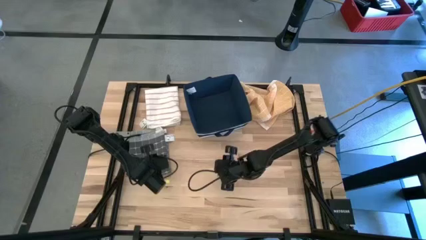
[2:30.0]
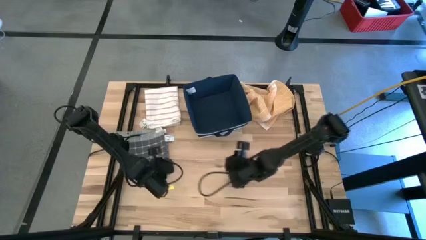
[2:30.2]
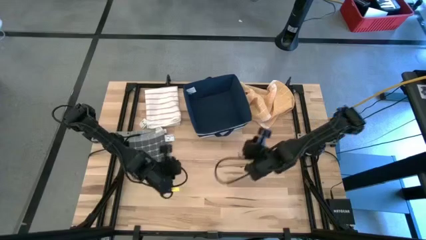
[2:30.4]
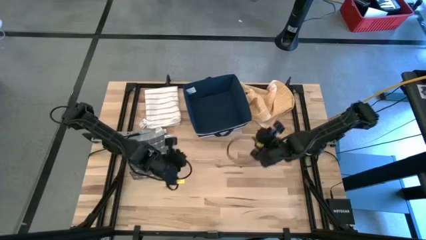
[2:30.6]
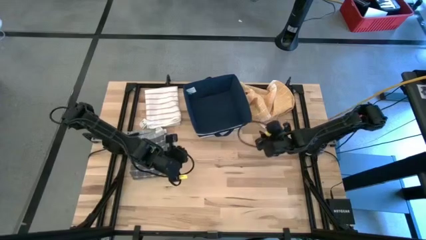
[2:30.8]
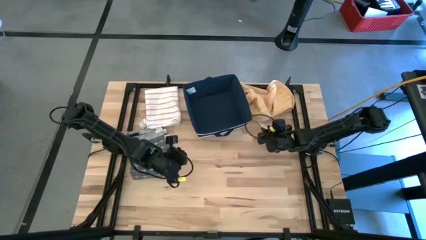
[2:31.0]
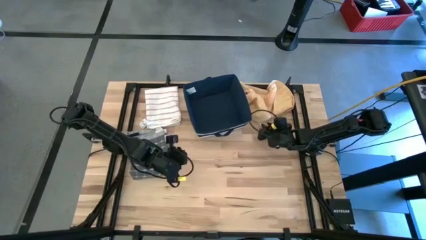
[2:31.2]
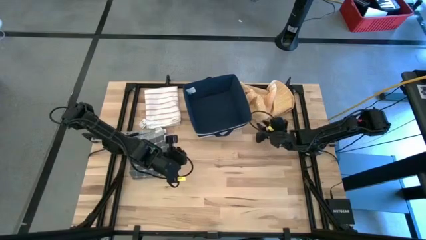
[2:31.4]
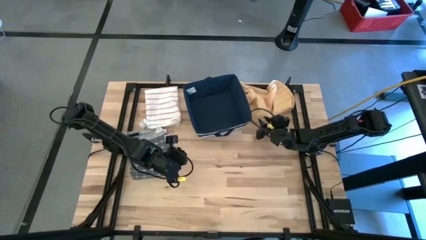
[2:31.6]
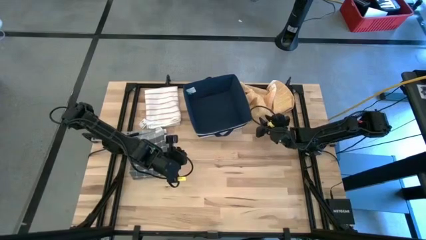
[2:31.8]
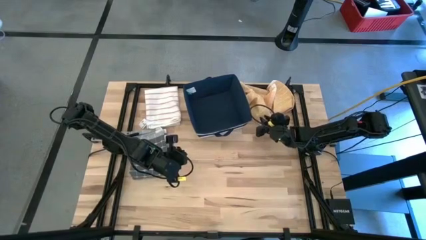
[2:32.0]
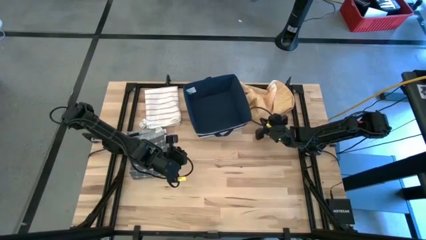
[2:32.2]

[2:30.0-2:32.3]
Task: Fold towel
Fold the orange towel

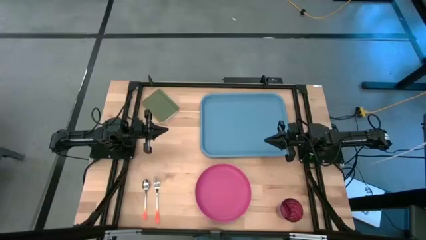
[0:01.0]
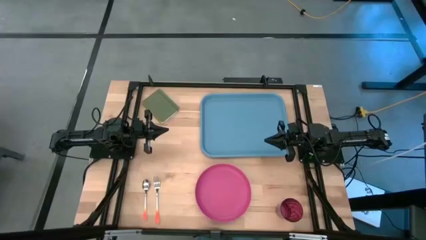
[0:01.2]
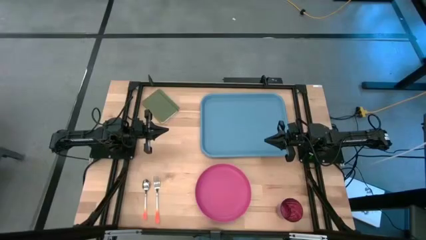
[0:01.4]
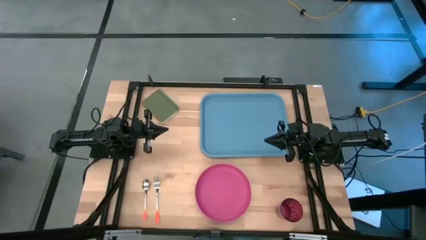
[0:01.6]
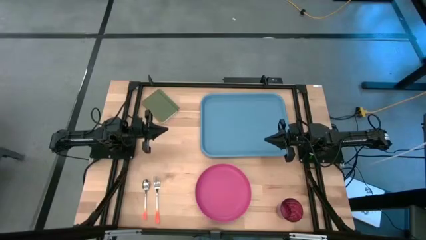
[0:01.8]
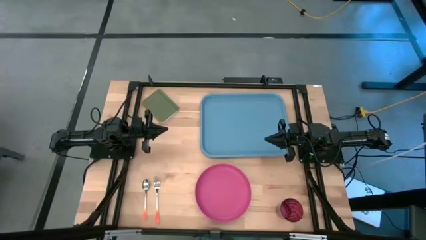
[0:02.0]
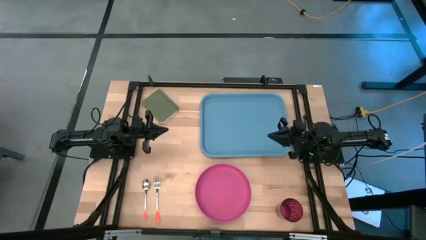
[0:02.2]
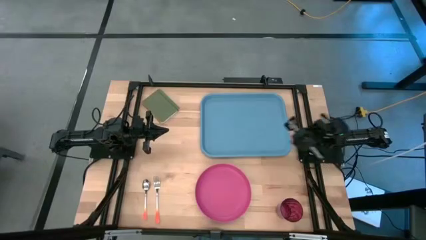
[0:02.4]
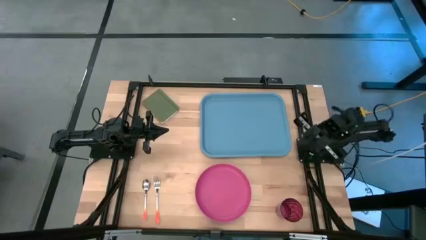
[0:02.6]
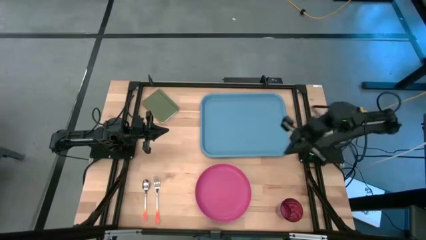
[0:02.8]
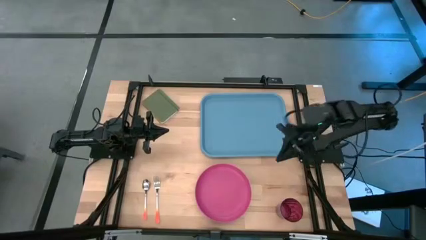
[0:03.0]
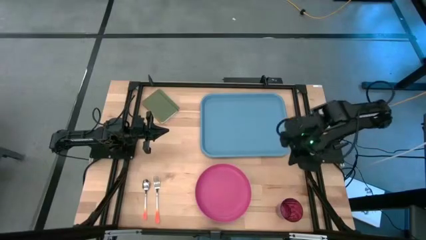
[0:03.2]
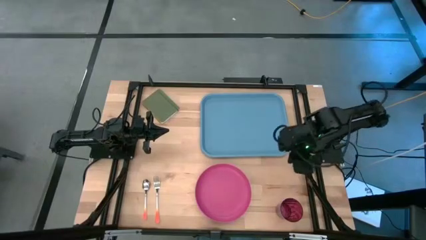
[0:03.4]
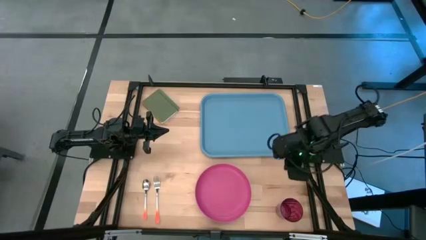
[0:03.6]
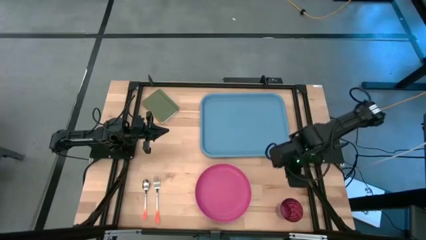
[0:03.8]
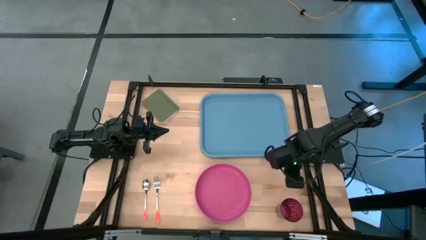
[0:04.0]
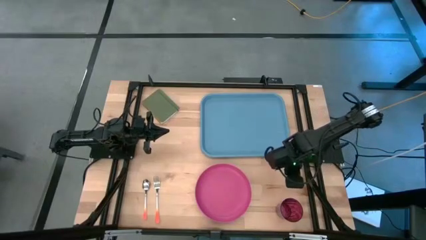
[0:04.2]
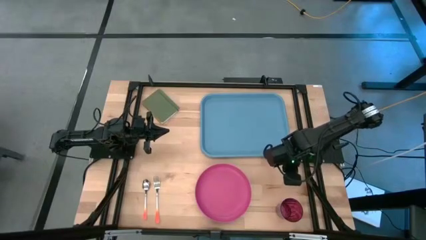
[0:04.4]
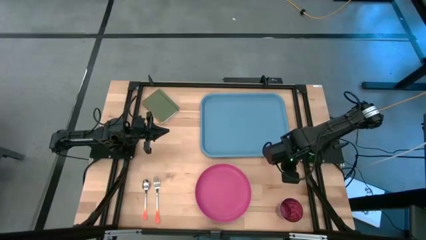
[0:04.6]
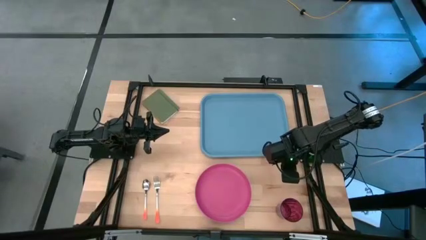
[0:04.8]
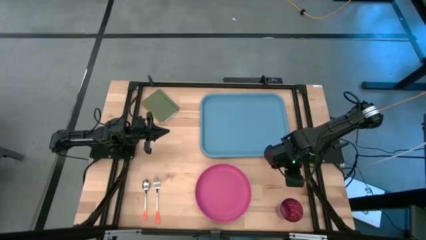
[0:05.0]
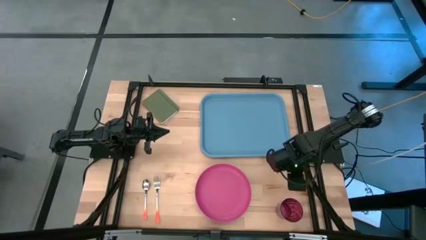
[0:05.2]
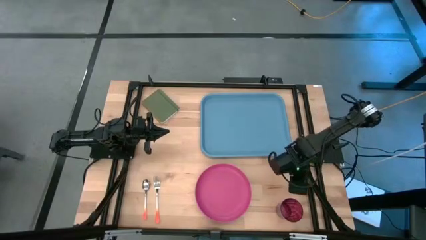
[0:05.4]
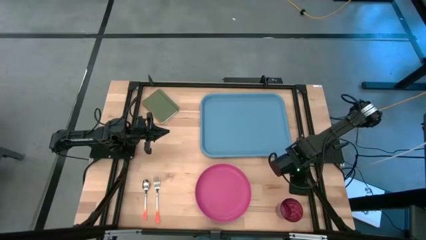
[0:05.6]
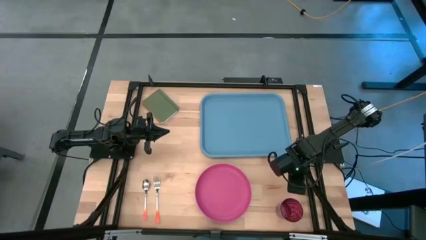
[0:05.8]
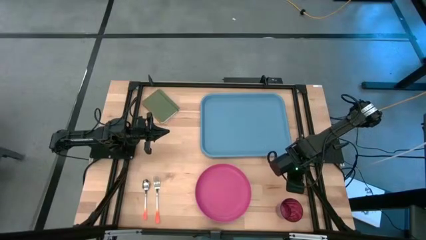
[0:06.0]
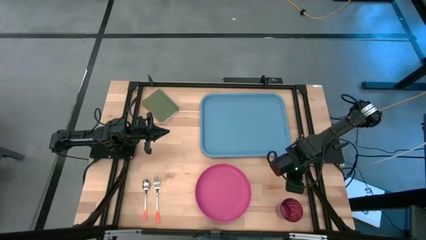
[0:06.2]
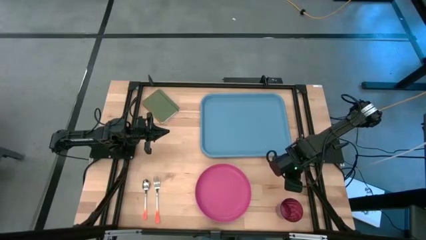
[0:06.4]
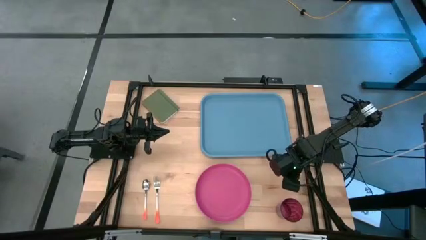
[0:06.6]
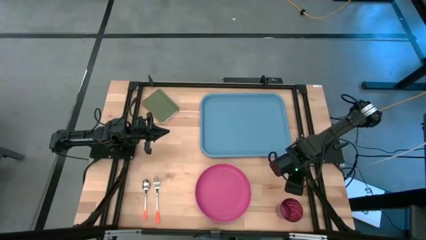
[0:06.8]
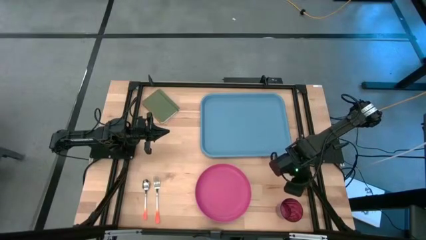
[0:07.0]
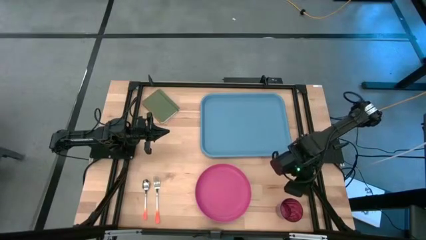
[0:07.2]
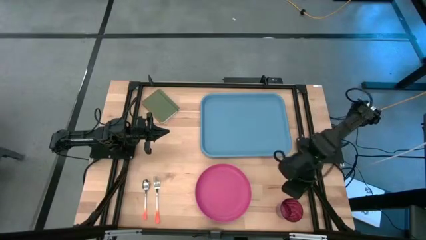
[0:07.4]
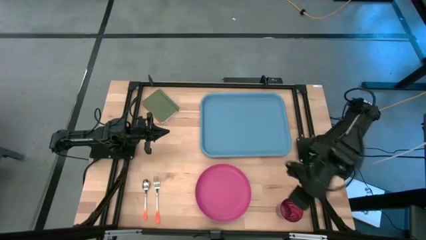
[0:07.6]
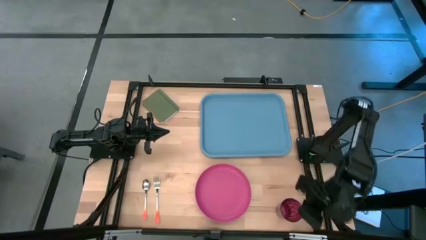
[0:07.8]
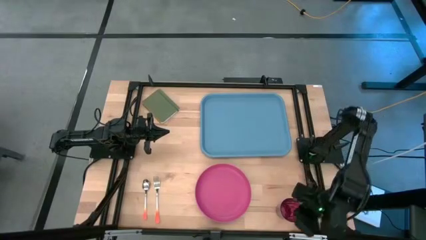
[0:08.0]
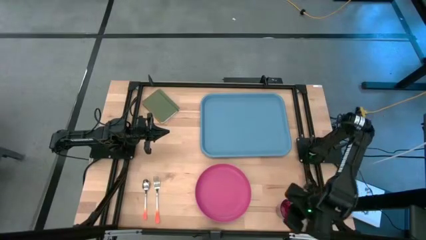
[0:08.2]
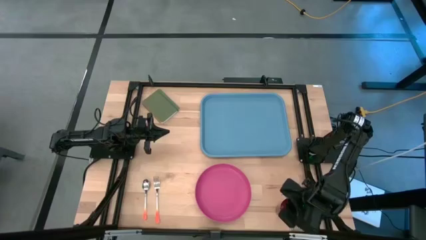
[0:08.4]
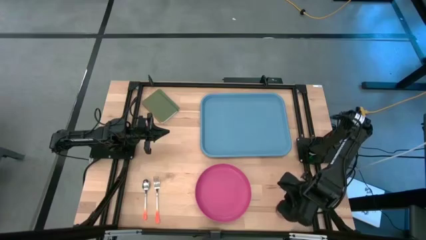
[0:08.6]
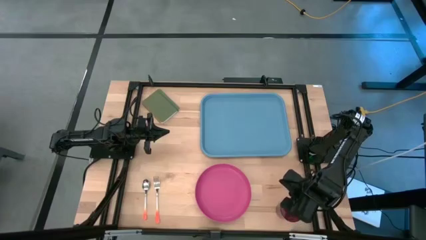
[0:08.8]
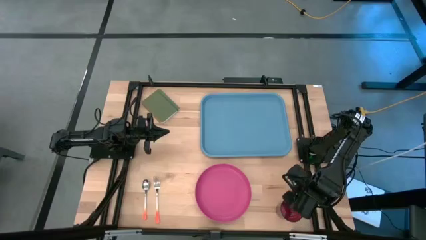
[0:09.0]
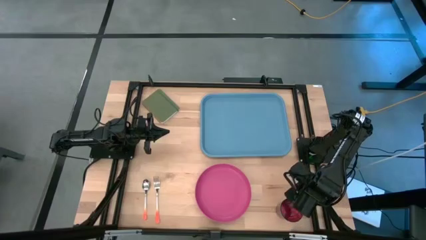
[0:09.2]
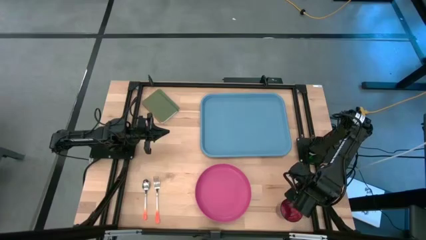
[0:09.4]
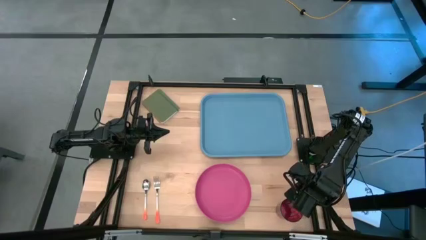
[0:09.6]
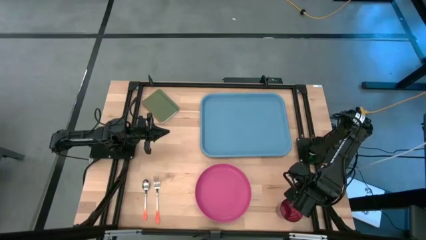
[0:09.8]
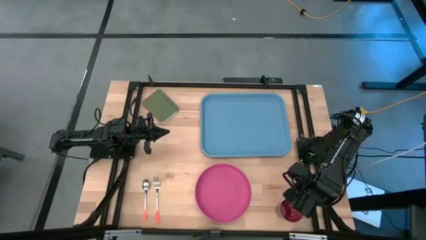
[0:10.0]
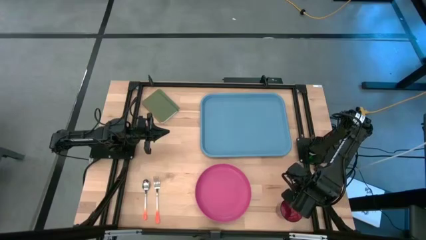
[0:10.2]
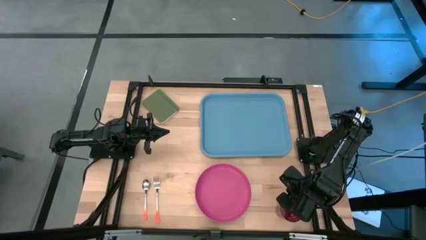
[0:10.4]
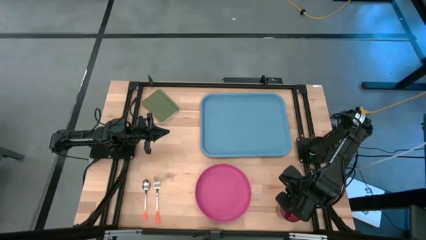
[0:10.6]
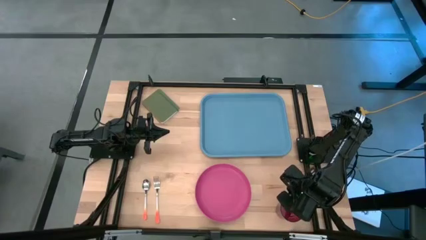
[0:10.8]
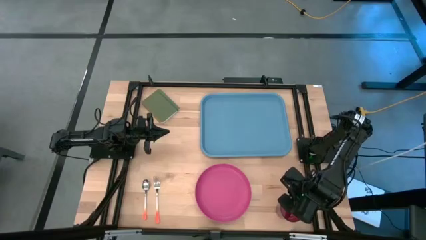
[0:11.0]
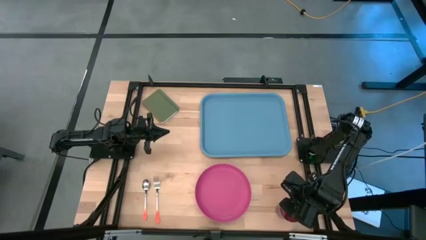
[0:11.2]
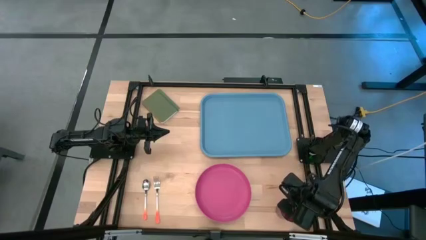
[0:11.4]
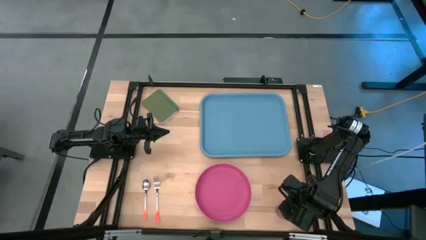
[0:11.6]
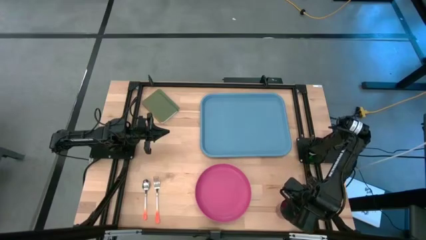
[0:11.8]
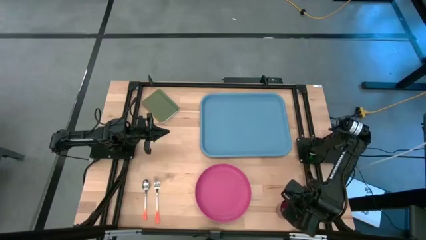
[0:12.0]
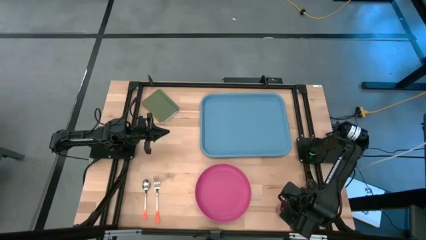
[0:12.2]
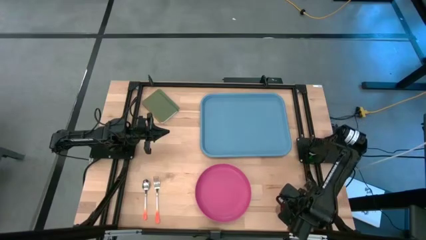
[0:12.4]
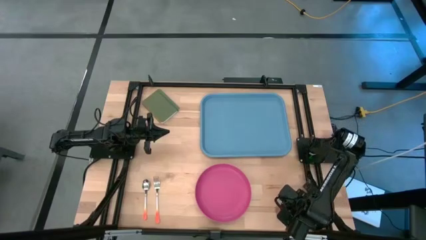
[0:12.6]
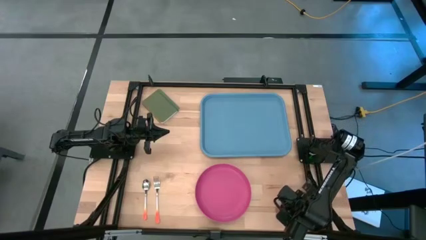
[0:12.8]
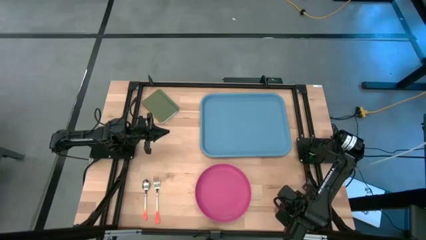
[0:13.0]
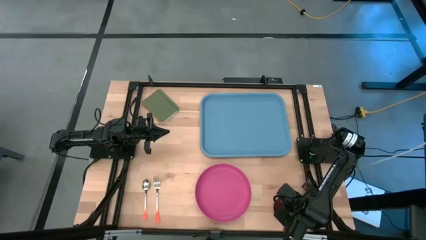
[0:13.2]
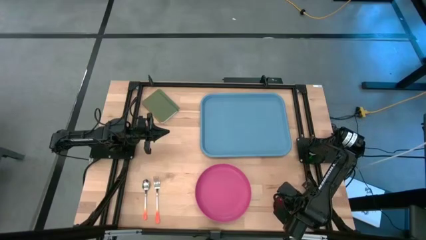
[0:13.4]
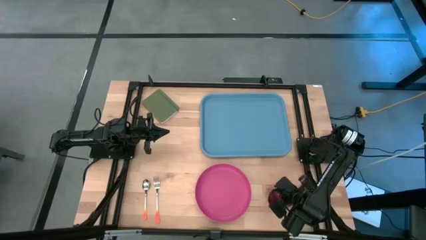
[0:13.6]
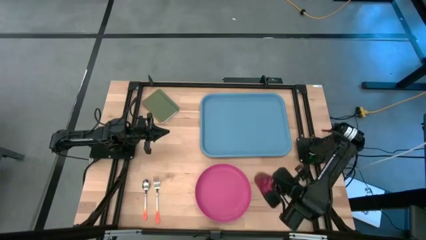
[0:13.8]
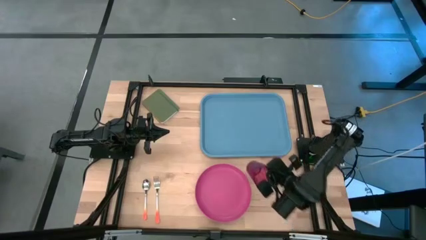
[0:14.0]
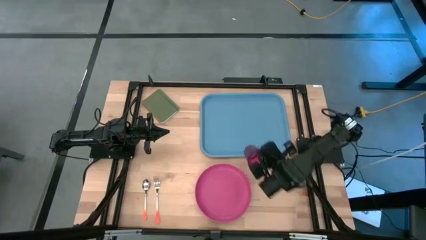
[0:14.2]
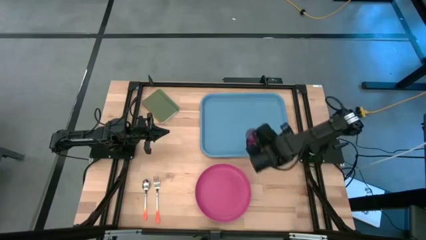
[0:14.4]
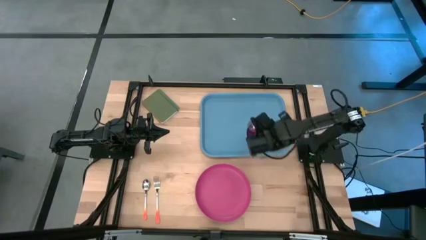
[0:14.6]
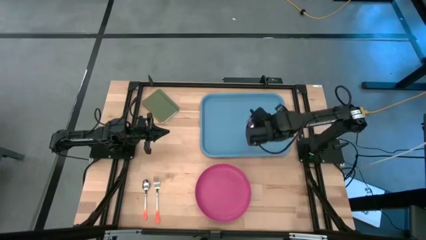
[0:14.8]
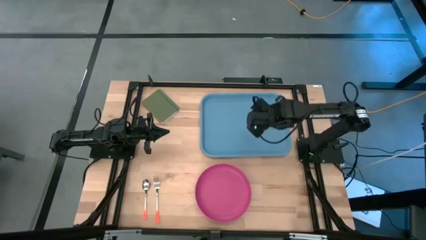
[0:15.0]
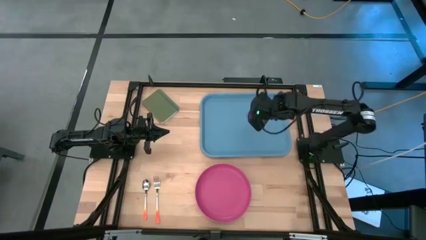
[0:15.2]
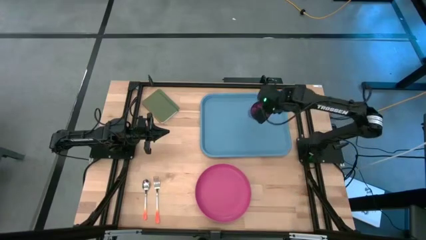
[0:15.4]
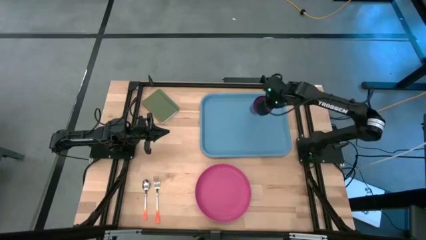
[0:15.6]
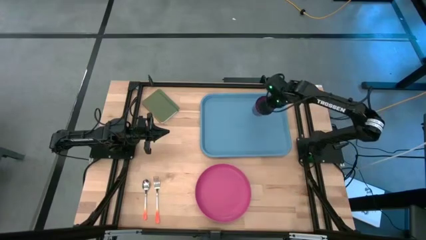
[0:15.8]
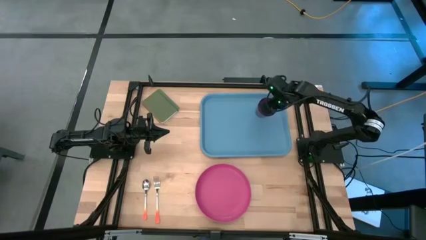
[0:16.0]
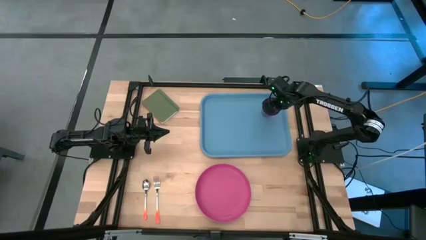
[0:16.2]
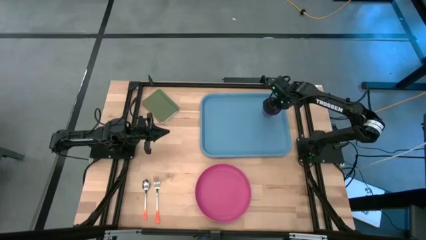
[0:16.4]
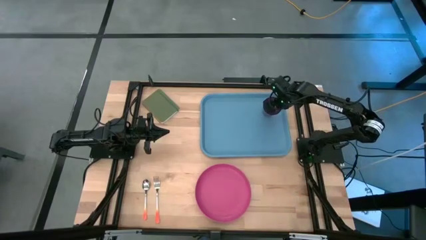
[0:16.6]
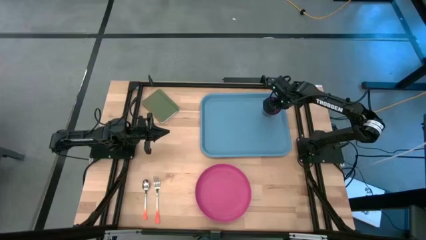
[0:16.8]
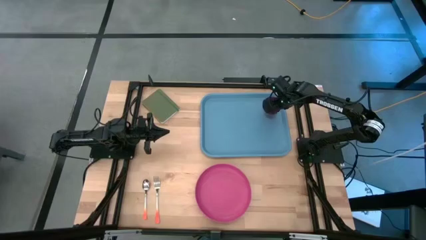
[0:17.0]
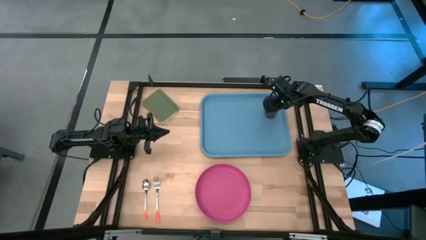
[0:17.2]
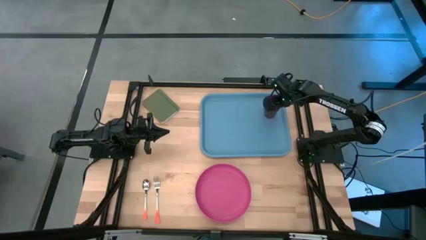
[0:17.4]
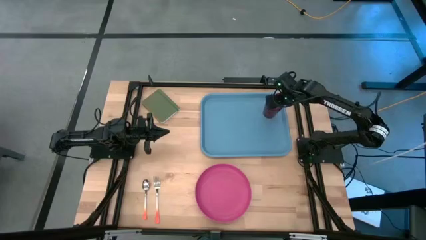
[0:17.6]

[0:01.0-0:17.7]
Task: Pick and place plate/cup/fork/spoon on tray
Put the red glass on the top right of the blue tray
